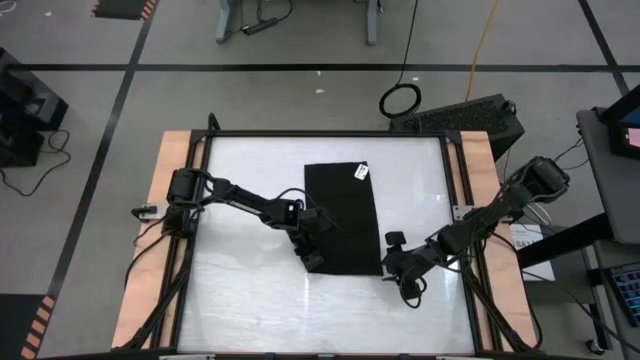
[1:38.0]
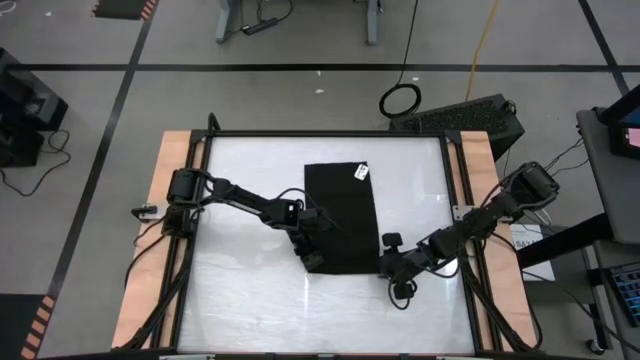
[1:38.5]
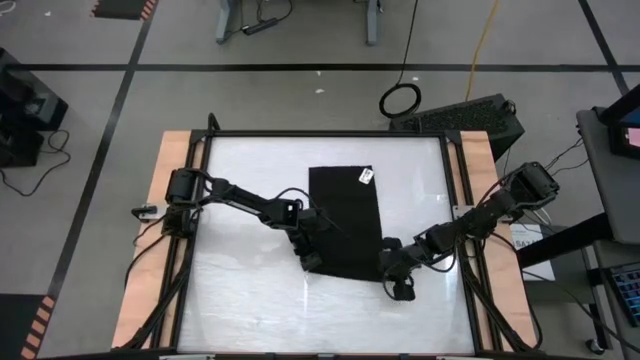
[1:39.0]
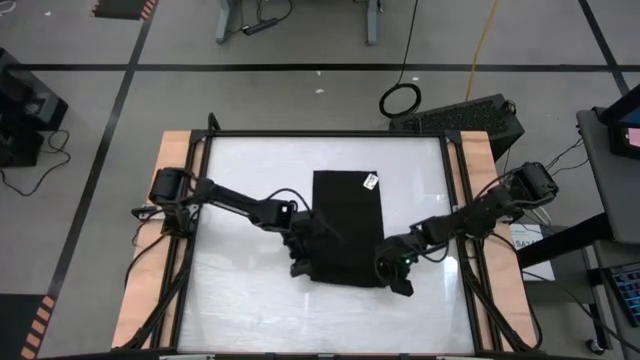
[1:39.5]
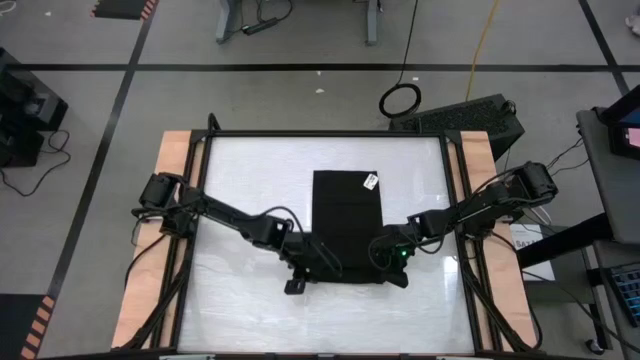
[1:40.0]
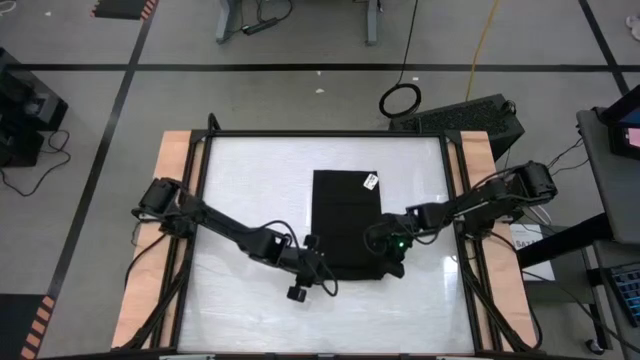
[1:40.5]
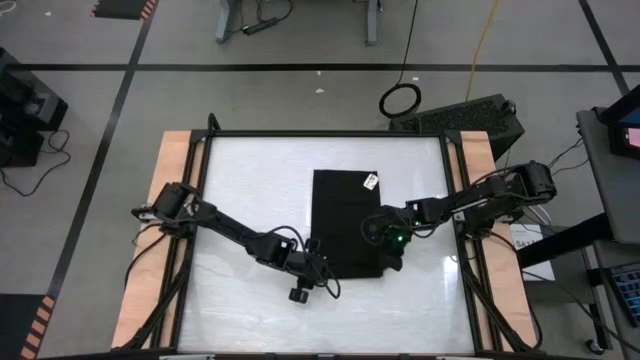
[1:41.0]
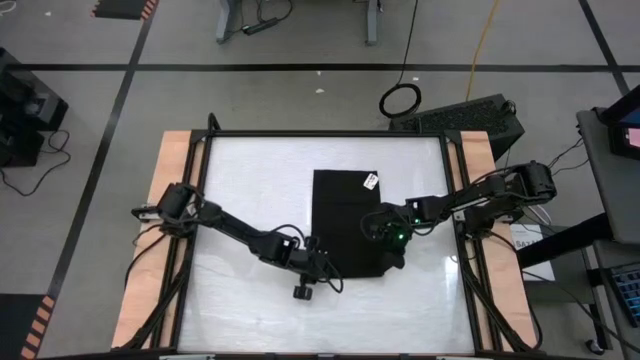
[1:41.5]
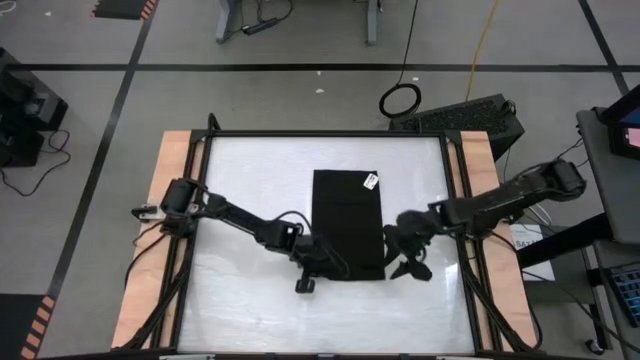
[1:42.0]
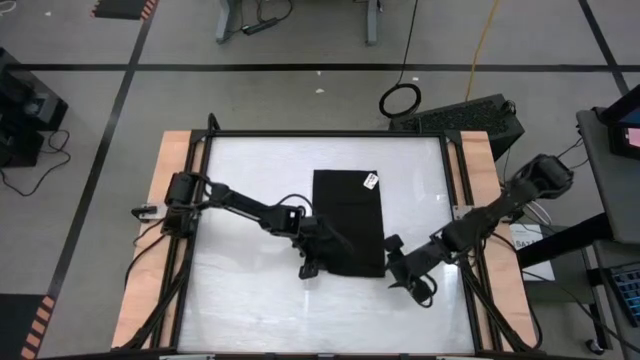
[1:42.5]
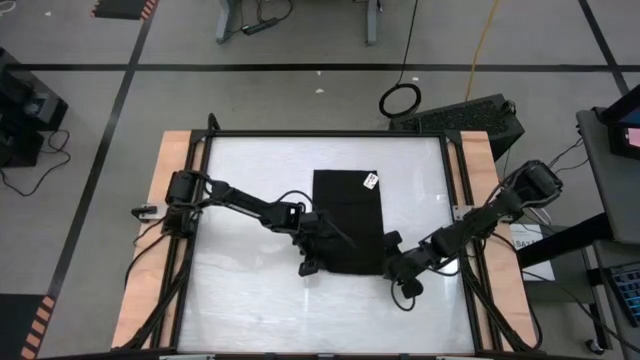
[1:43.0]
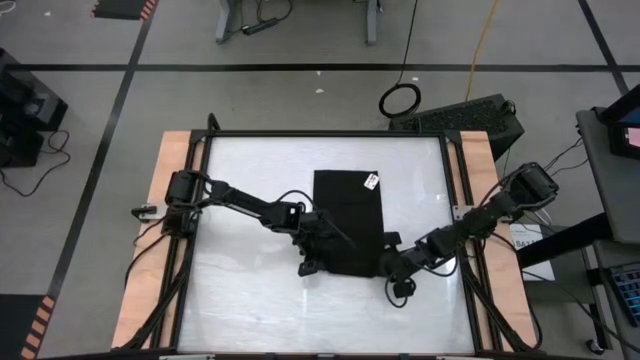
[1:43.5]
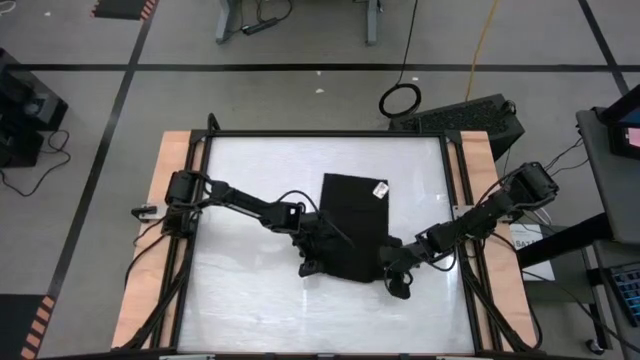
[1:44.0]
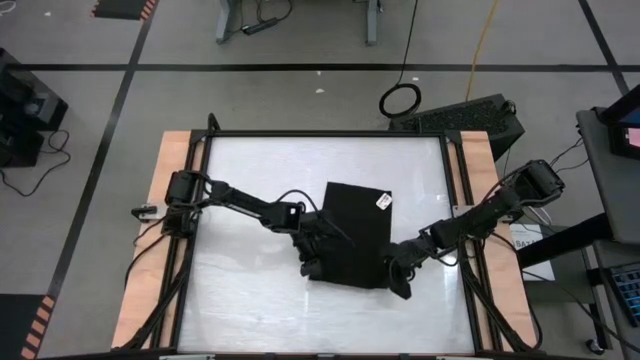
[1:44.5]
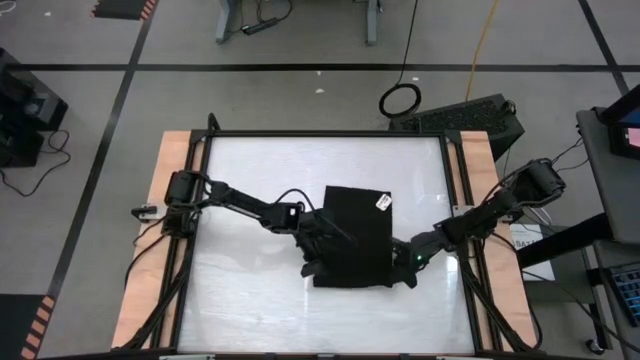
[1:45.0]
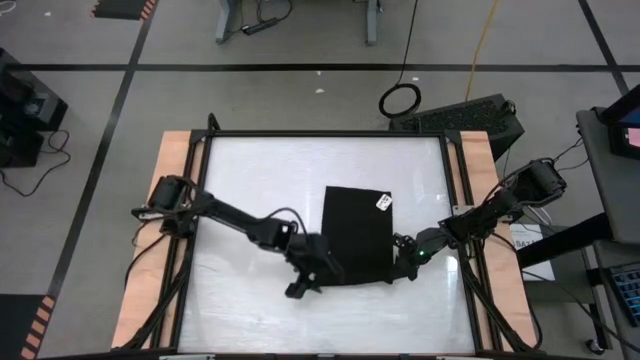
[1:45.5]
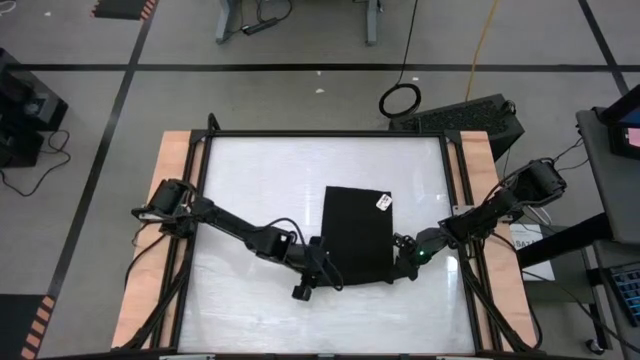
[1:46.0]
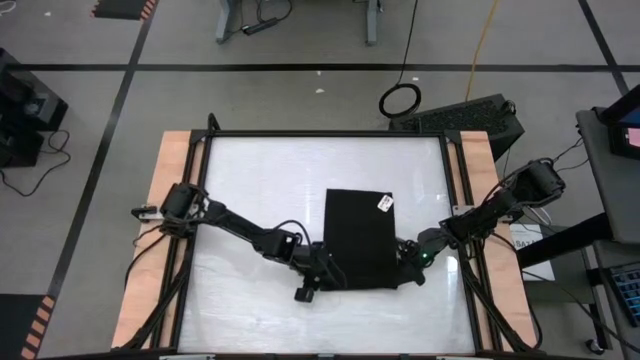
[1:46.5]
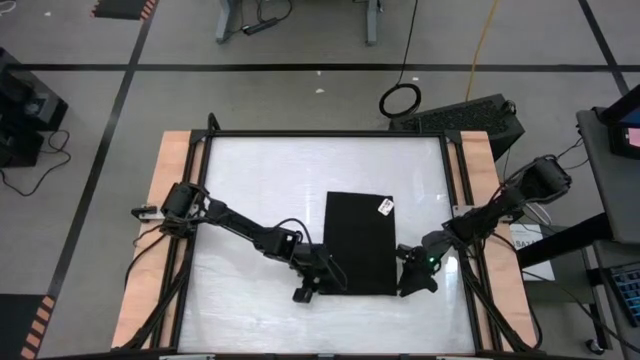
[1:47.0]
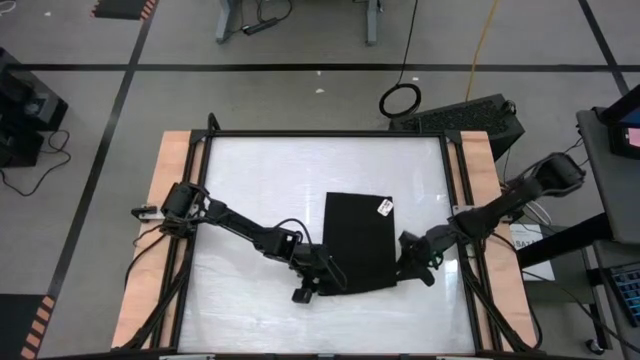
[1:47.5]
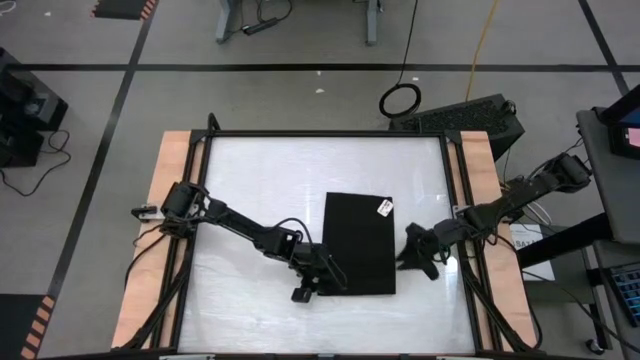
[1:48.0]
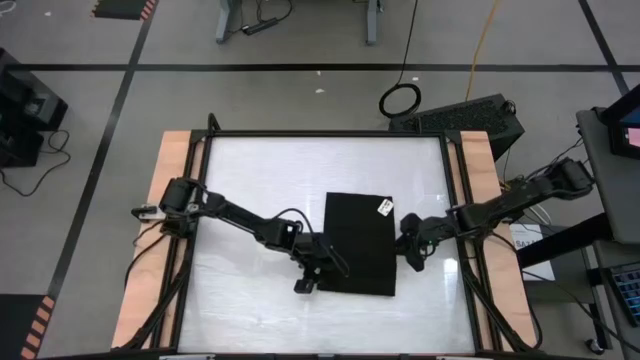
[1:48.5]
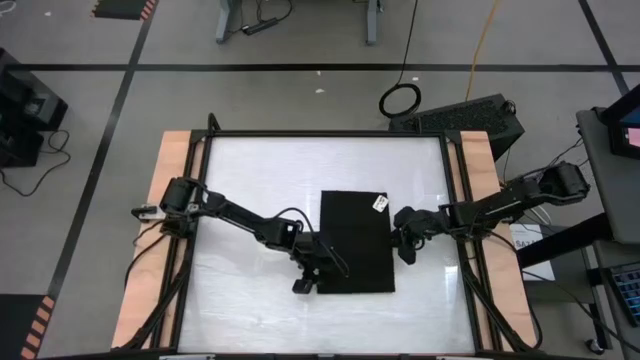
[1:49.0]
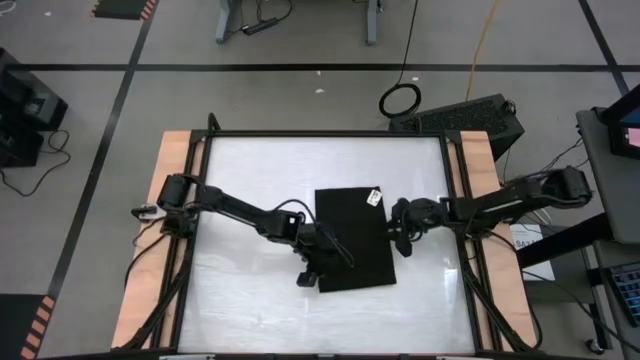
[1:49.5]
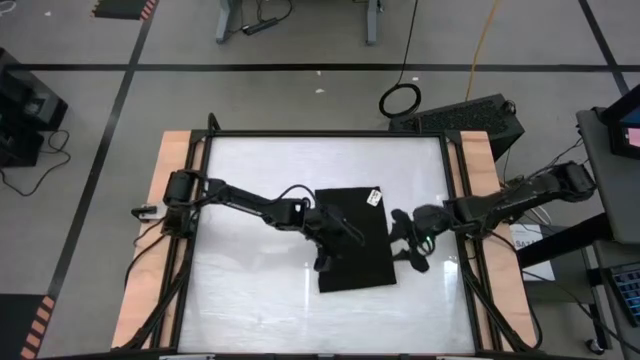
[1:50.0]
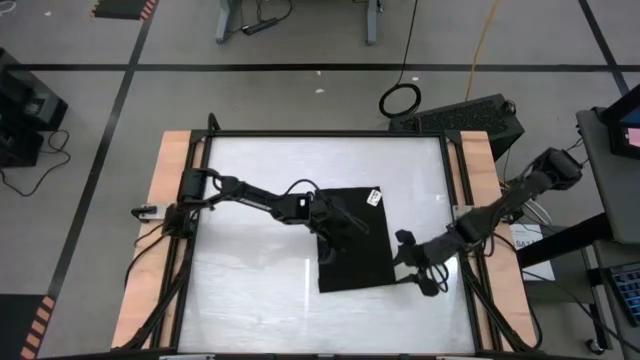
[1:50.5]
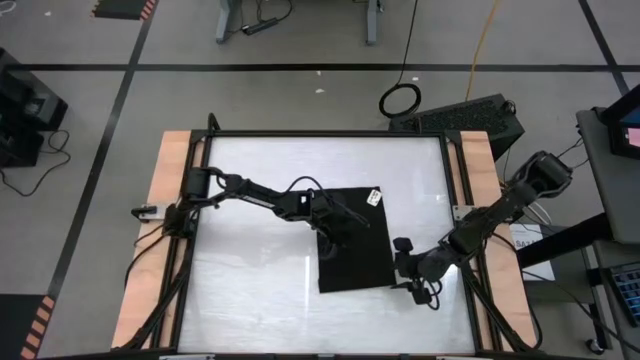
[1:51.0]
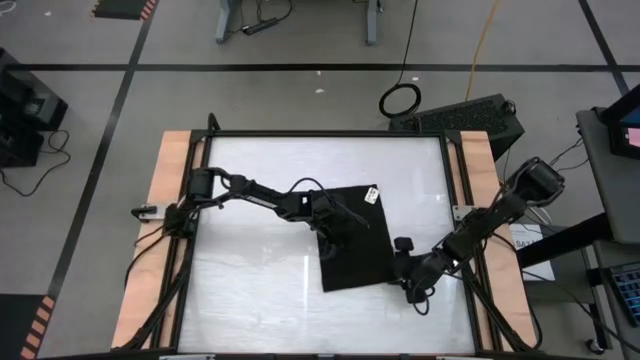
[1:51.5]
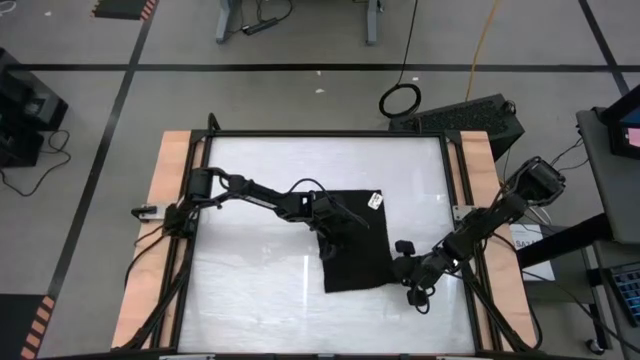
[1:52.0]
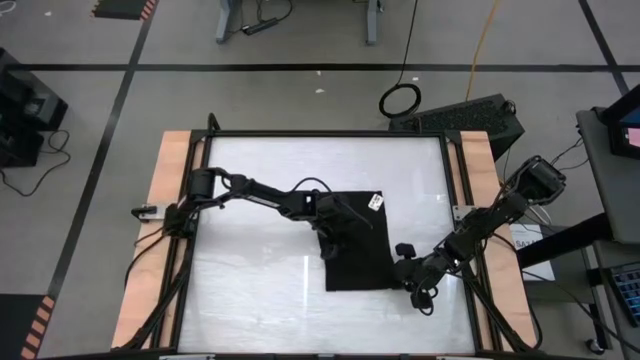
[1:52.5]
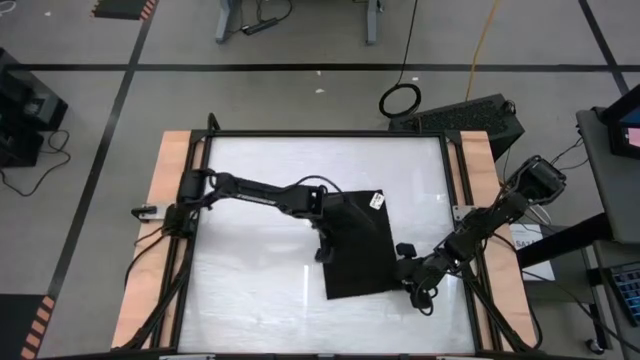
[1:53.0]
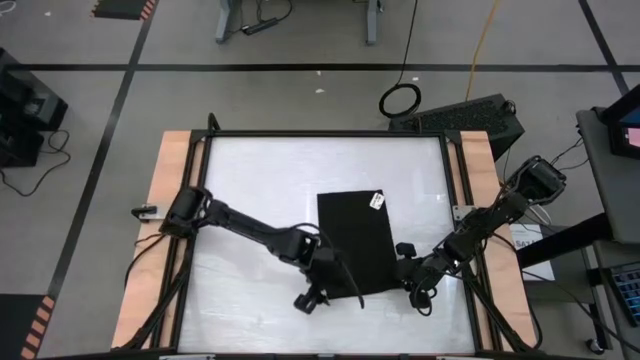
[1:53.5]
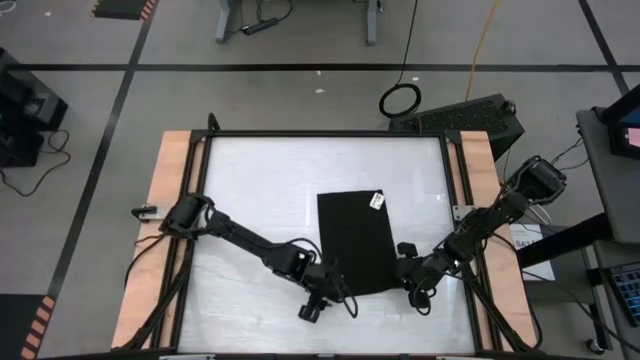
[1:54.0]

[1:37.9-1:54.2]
Task: Roll towel into tight, uniform cylinder
Roll the black towel

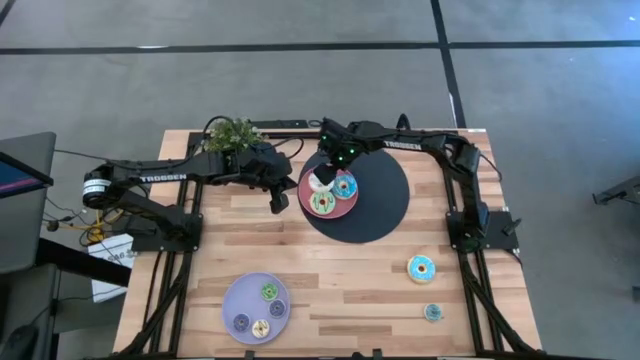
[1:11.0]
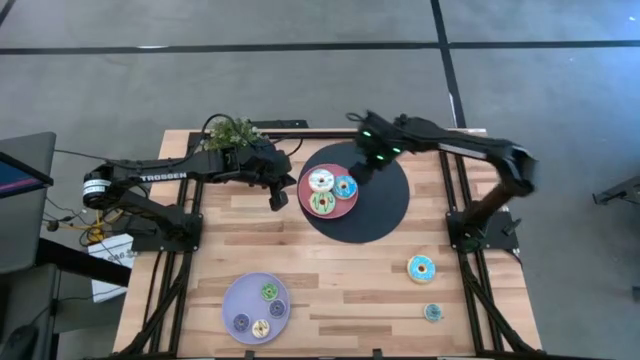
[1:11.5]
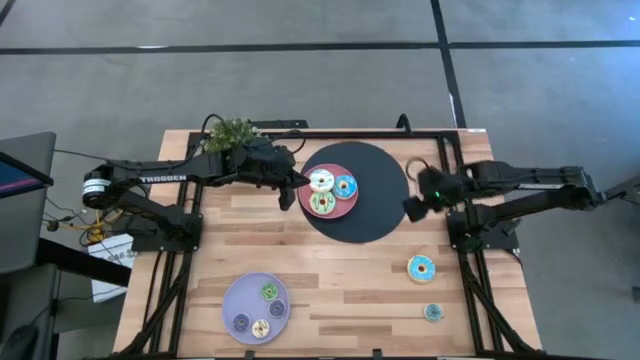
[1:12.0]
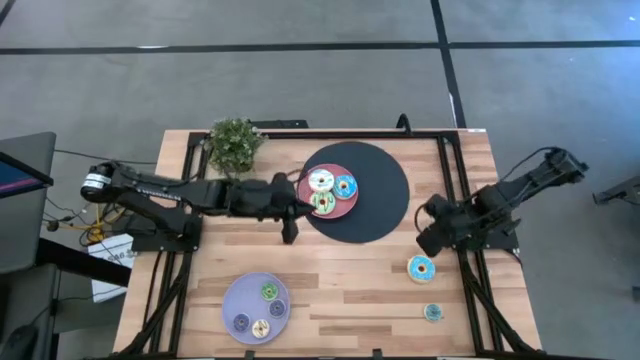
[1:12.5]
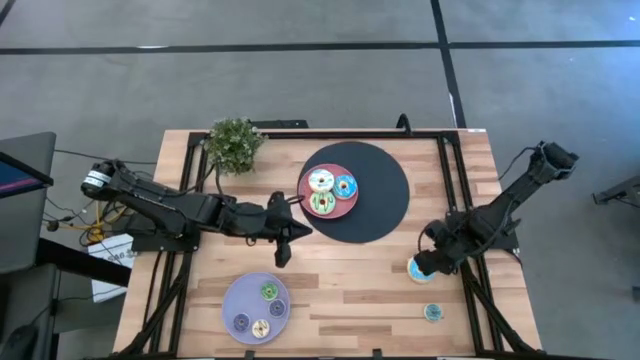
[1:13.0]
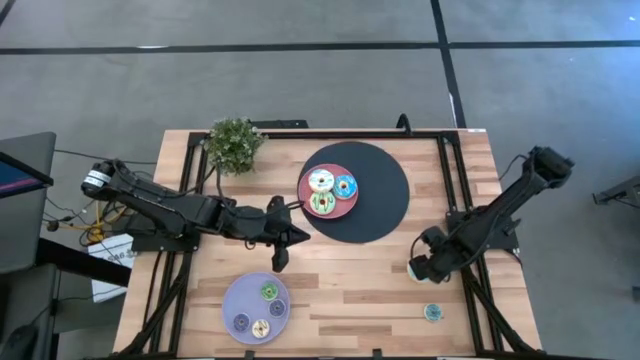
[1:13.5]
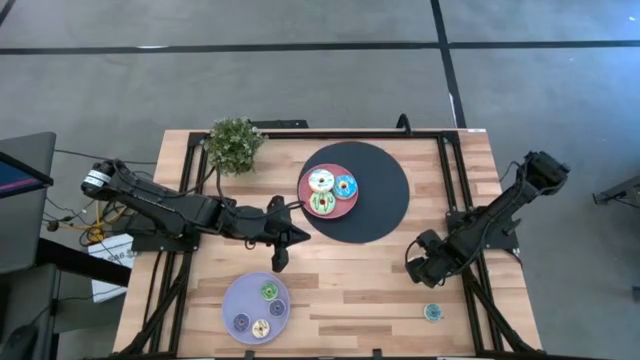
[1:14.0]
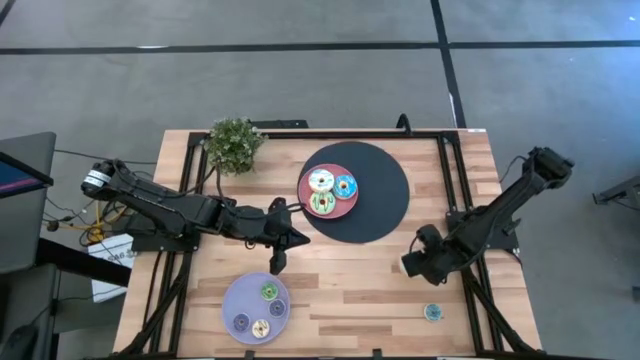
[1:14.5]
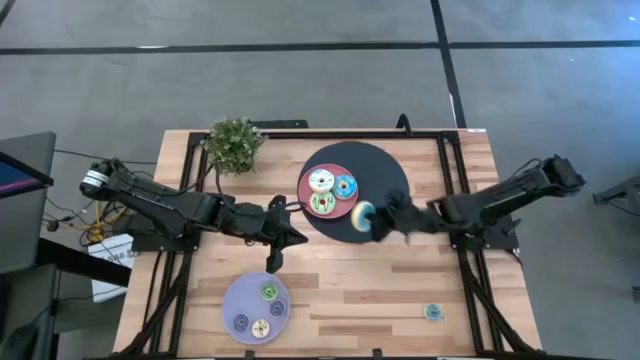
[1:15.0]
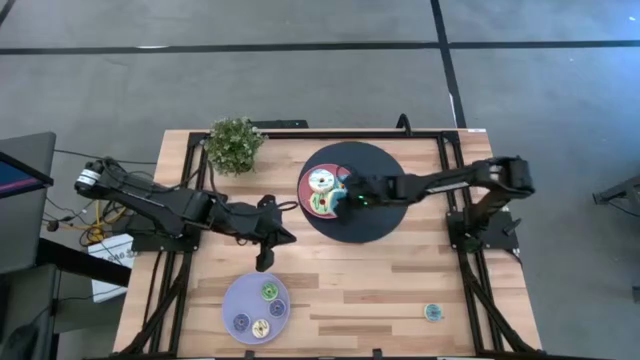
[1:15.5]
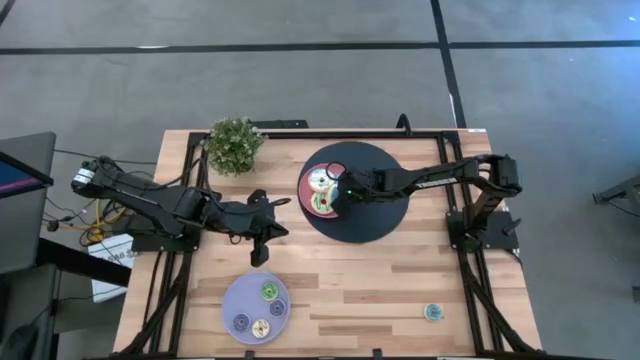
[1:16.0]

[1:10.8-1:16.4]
Task: Pick & Place donuts
Put the big blue donut on the pink plate
